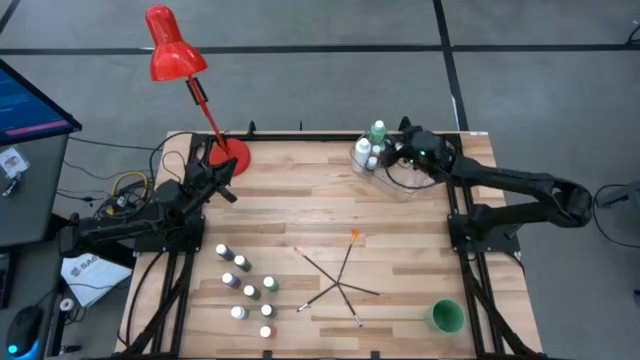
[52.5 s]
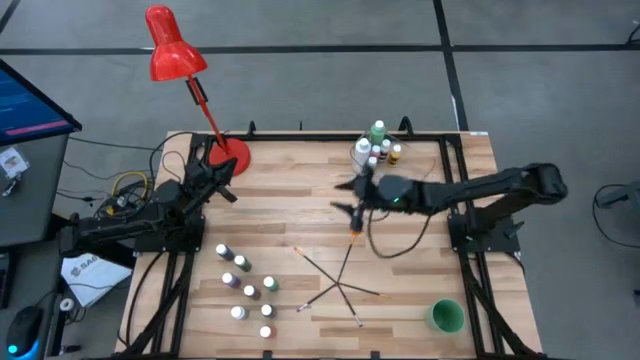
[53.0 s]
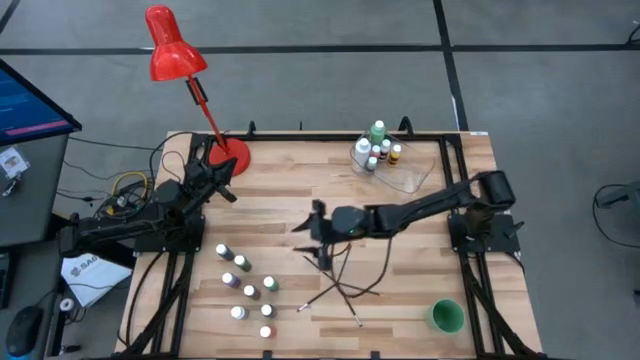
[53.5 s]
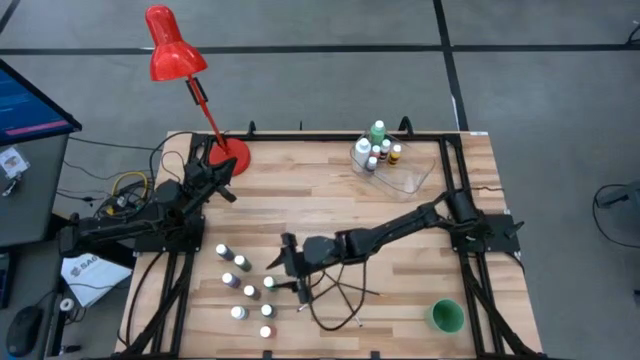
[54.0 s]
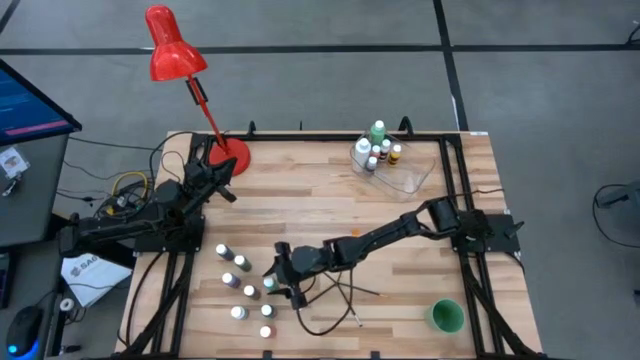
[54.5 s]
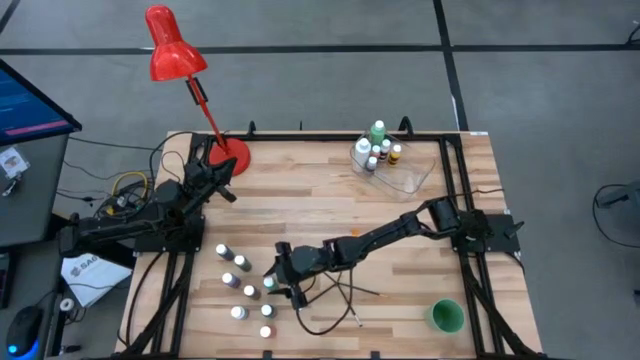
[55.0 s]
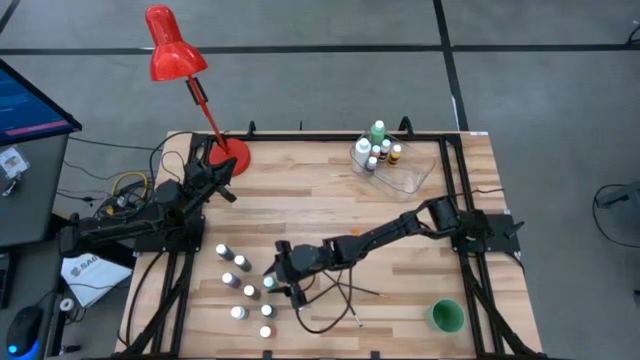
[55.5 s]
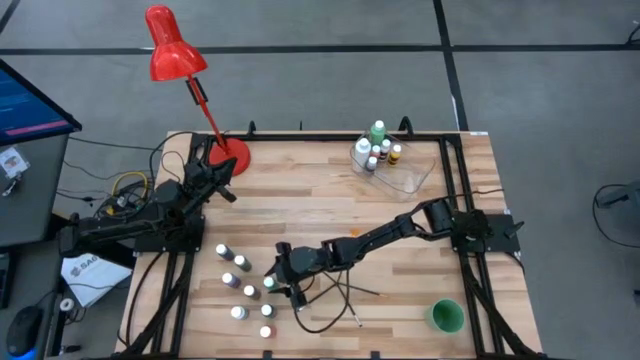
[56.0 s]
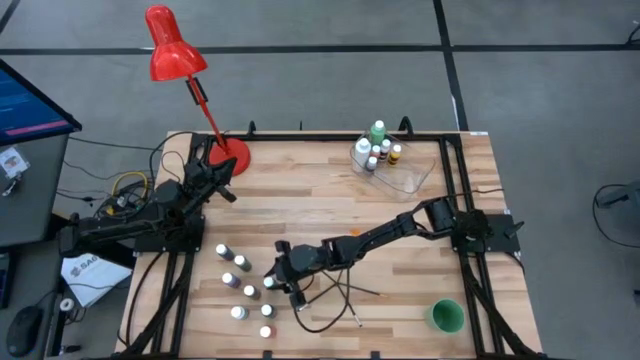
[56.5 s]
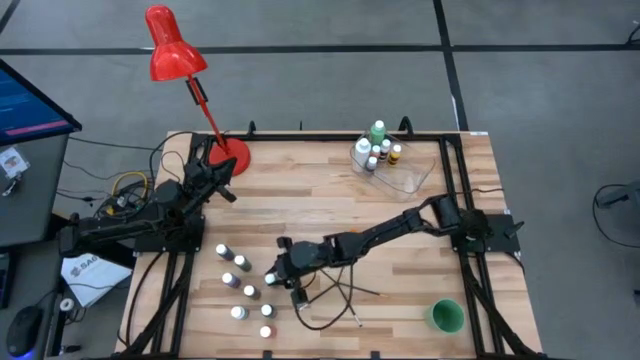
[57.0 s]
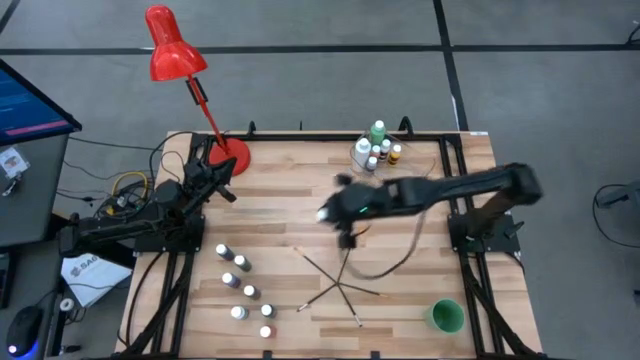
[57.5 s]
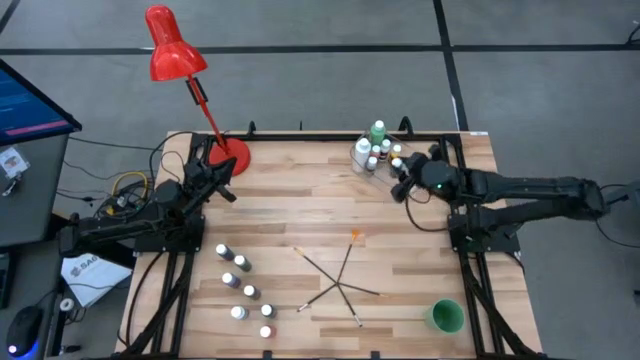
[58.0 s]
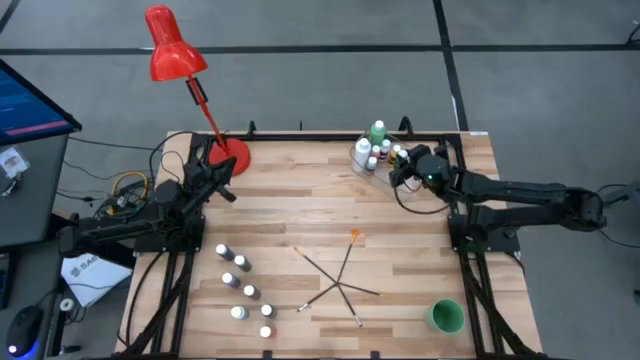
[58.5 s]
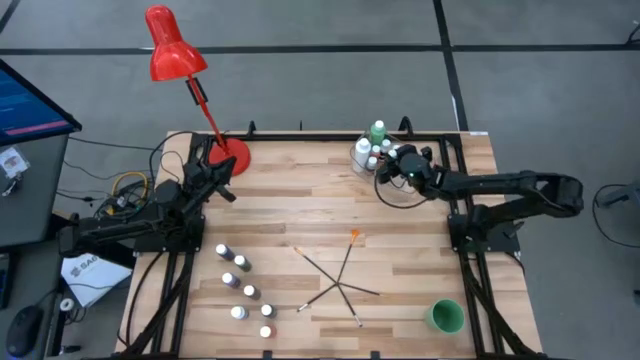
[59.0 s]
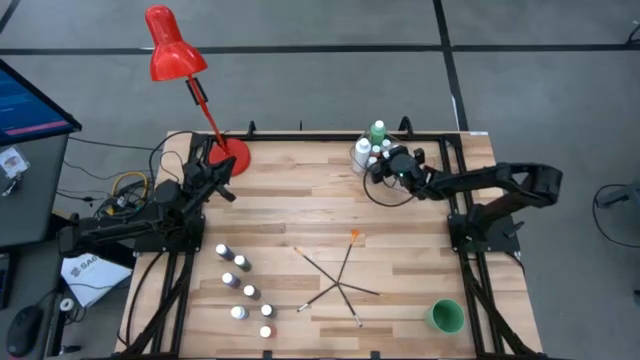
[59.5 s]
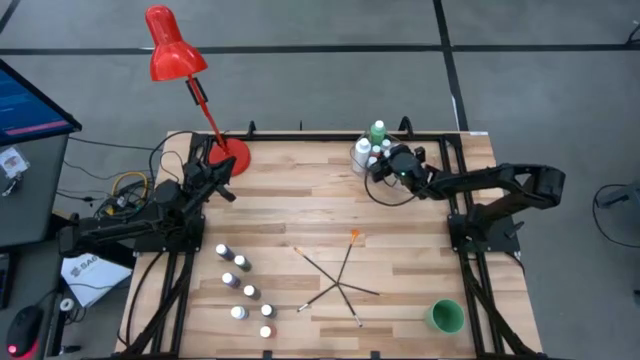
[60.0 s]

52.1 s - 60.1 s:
Task: Pick & Place Paint Supplies
Put the small green paint bottle into the transparent bin

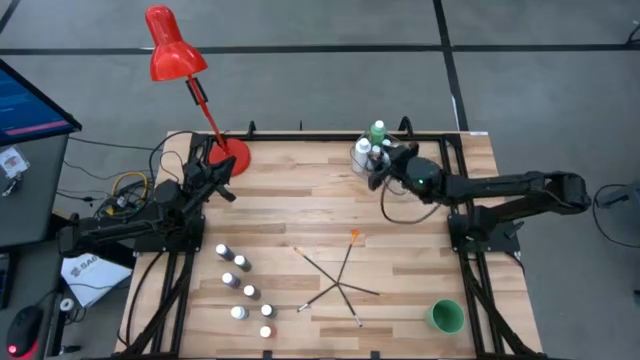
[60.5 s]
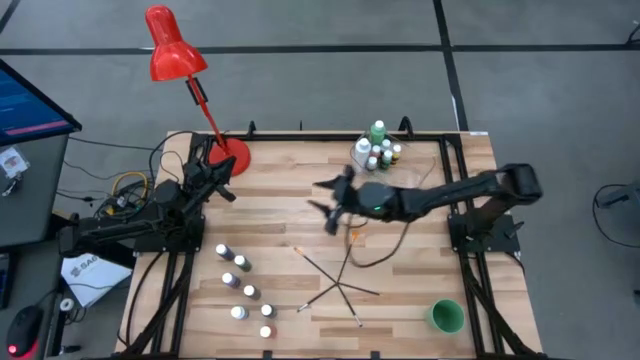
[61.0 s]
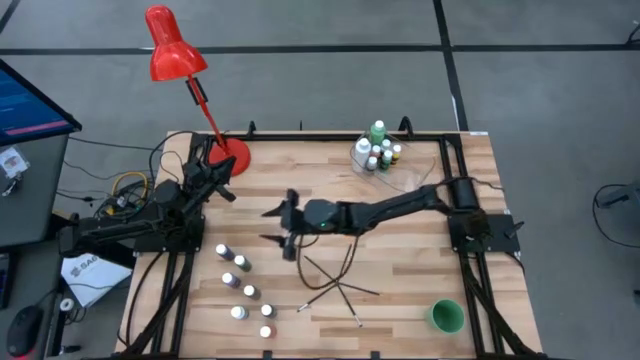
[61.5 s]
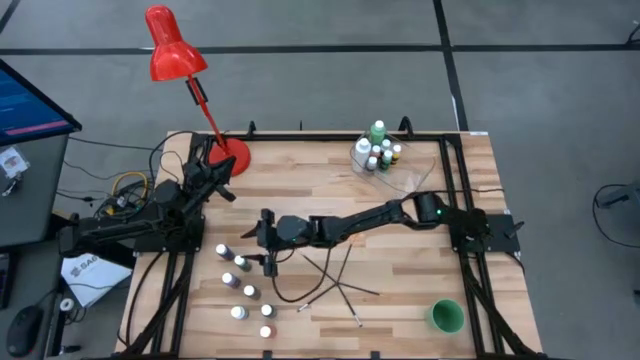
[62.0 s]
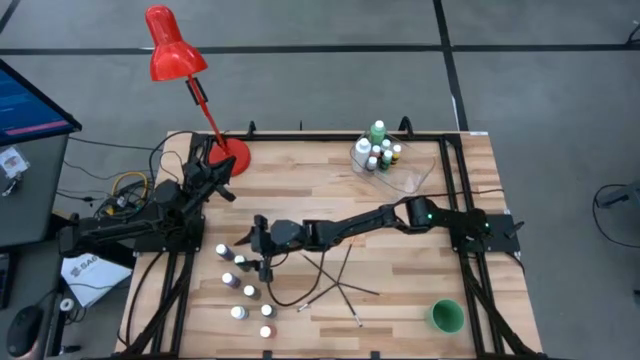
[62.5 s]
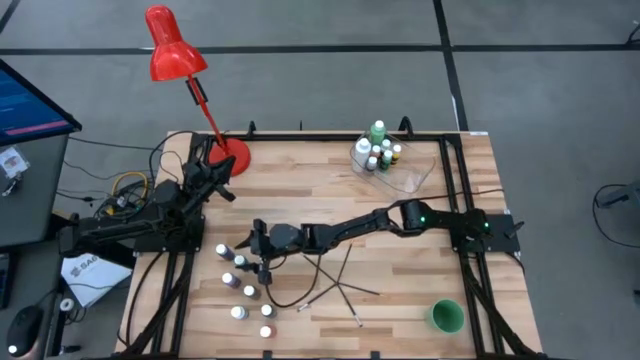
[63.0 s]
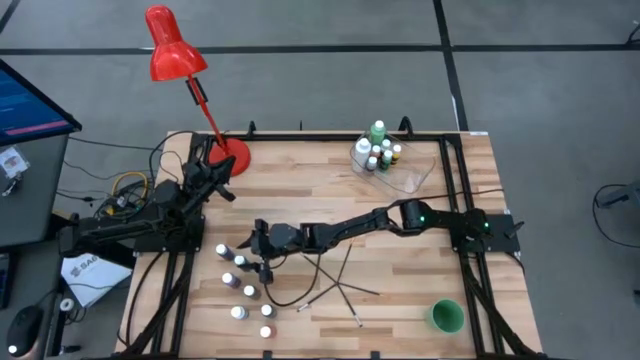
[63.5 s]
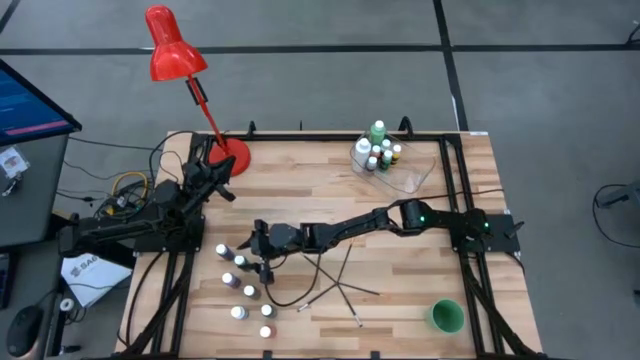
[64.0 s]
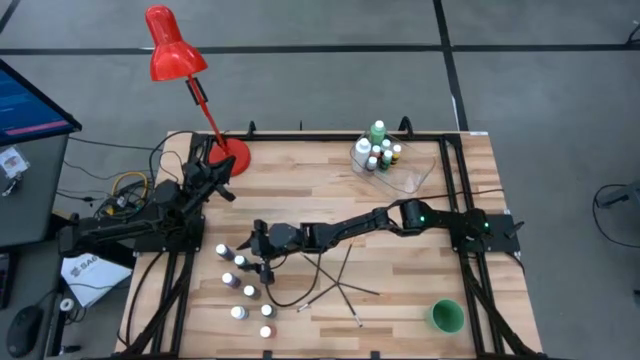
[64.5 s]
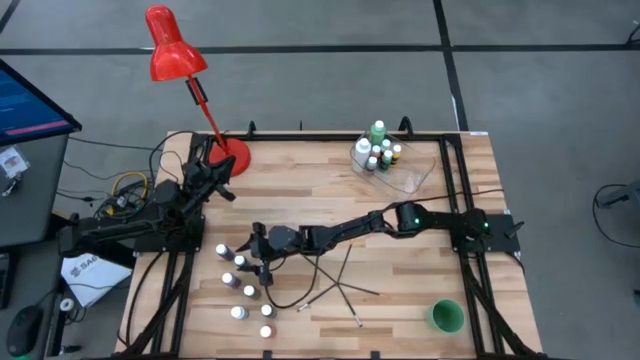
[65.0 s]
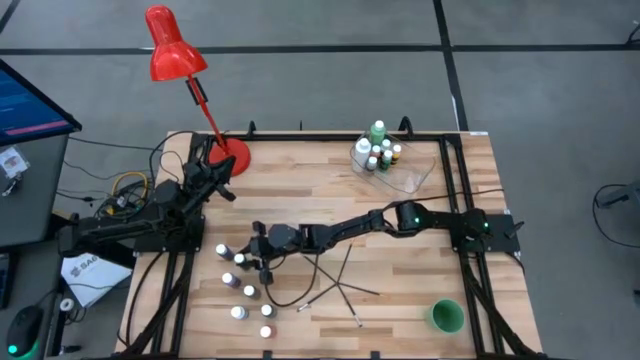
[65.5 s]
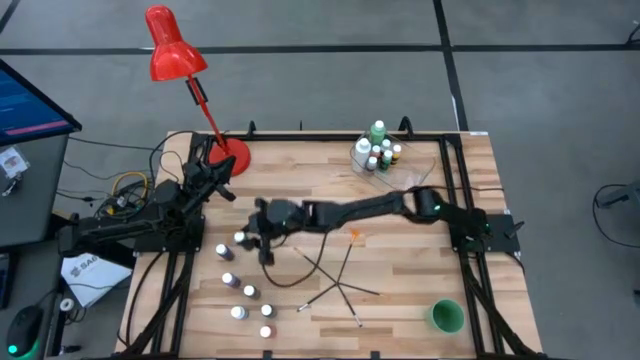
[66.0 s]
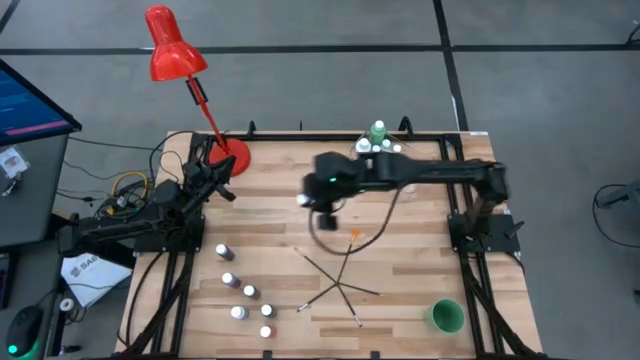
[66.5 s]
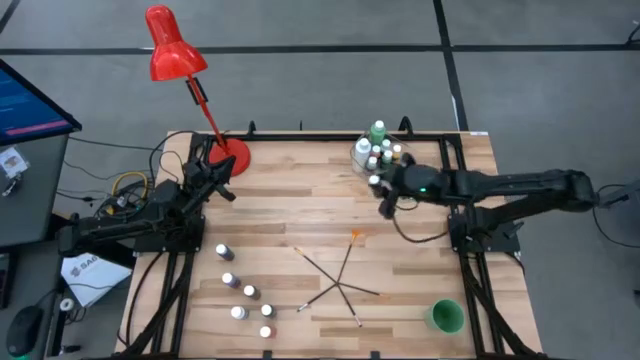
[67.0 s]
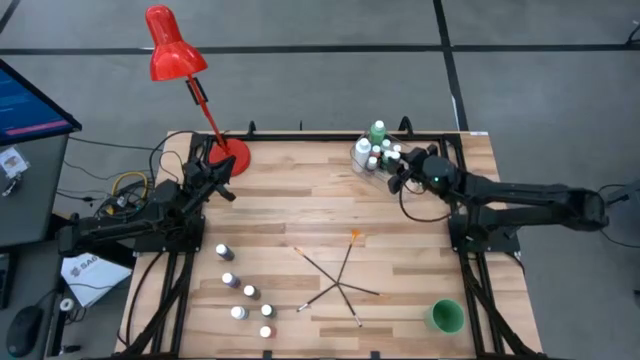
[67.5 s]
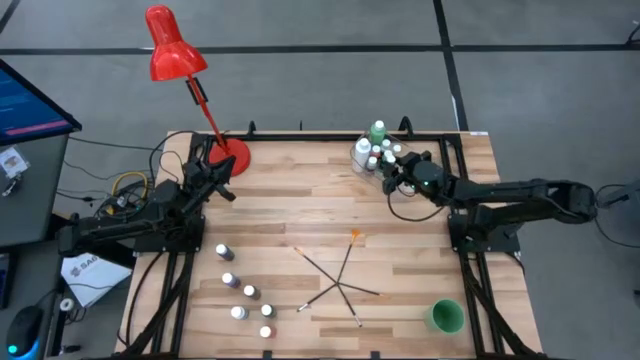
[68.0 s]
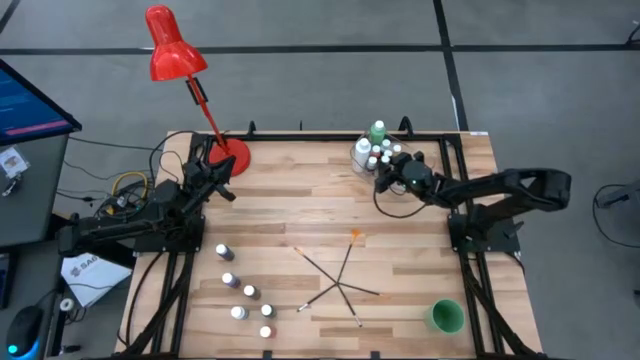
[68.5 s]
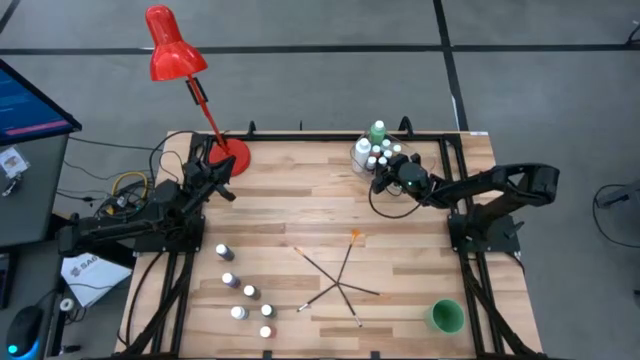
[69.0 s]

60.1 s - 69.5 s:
Put the small dark green paint bottle into the transparent bin

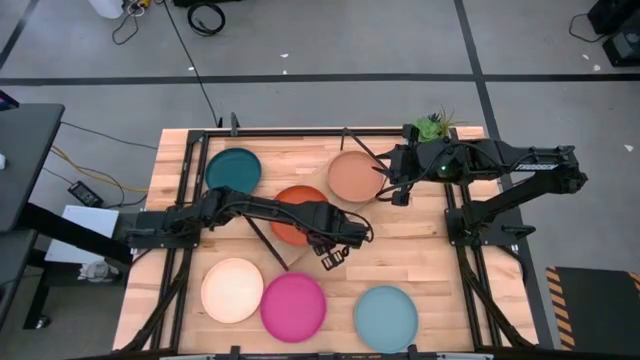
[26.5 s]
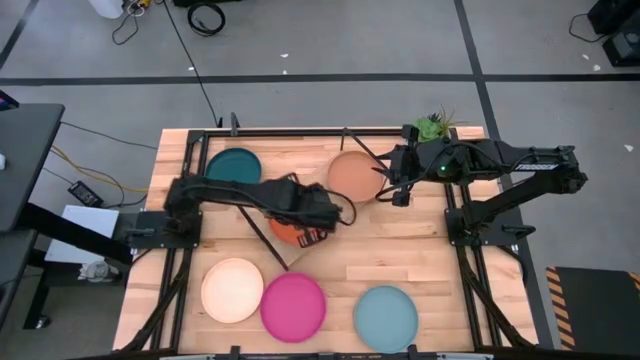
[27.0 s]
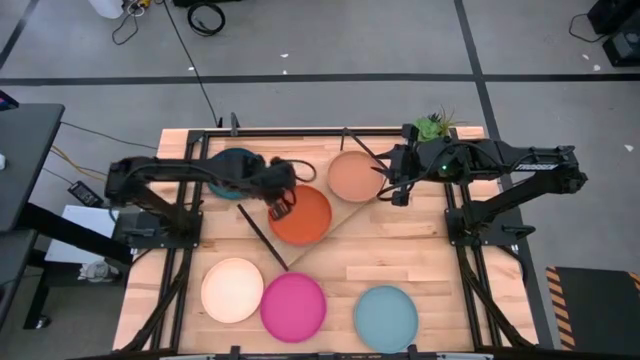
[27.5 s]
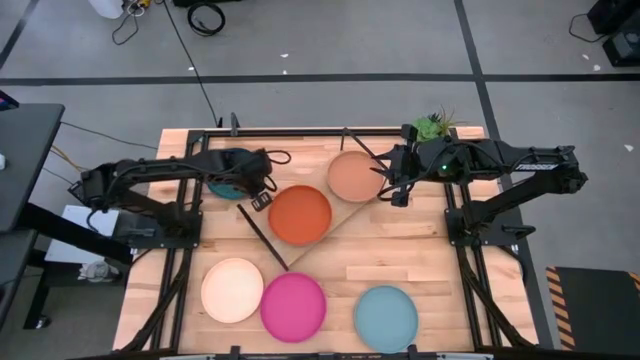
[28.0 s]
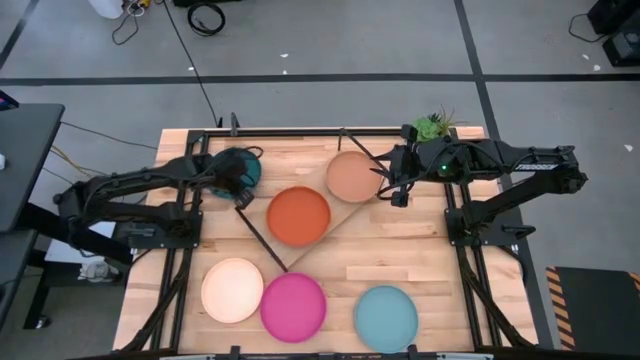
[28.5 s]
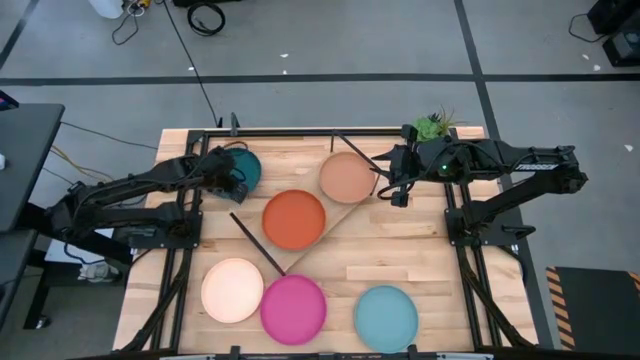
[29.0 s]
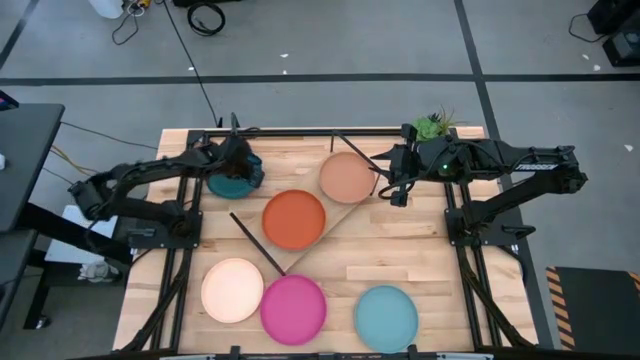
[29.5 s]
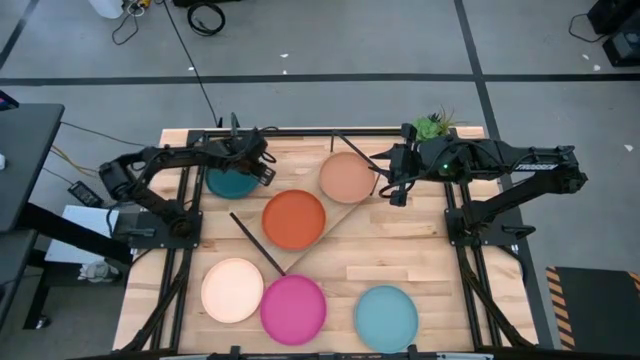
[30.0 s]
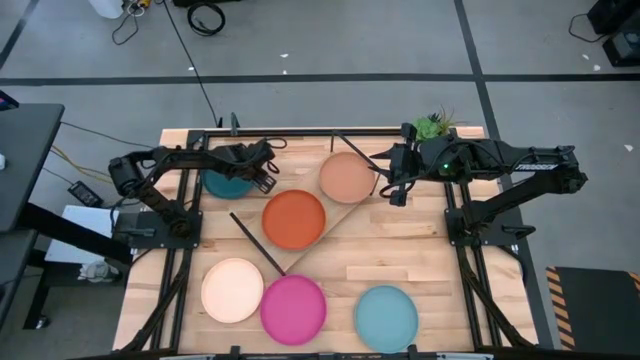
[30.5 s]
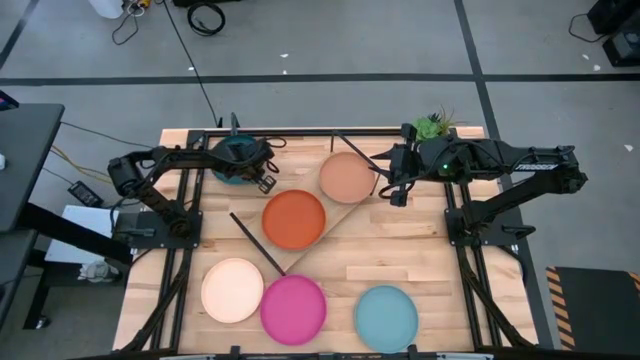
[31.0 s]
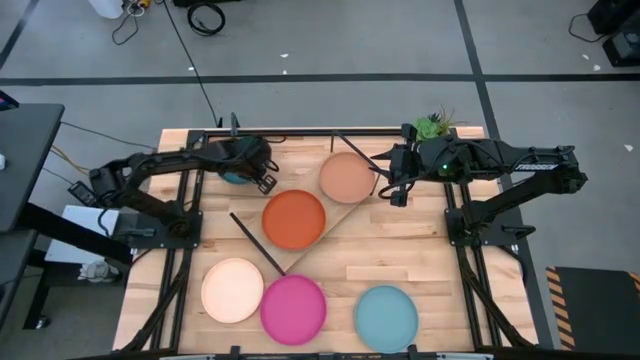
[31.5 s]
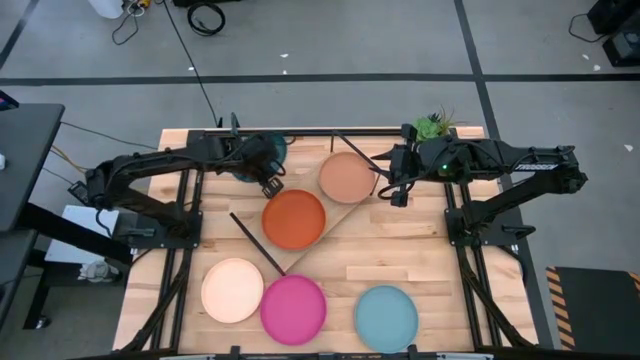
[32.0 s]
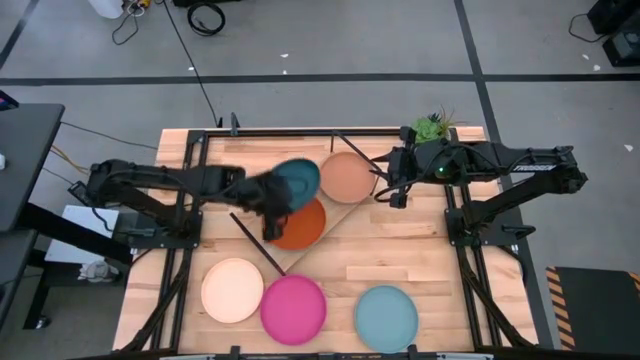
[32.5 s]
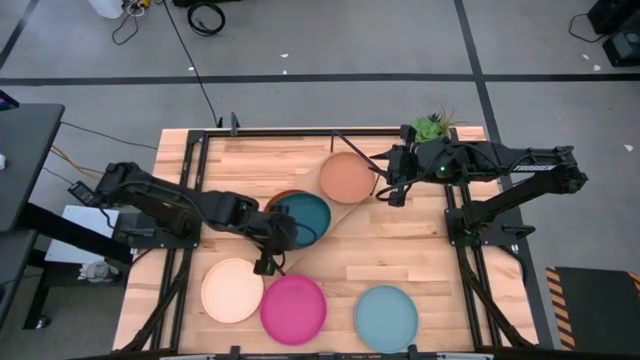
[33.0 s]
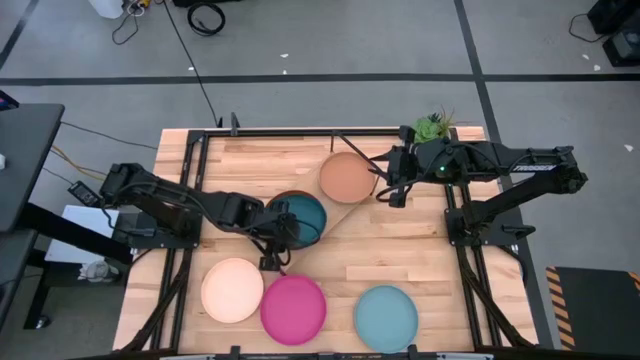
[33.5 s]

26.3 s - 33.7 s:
Task: Place and stack plates onto a shelf
Stack the dark blue plate on top of the orange plate on the shelf
